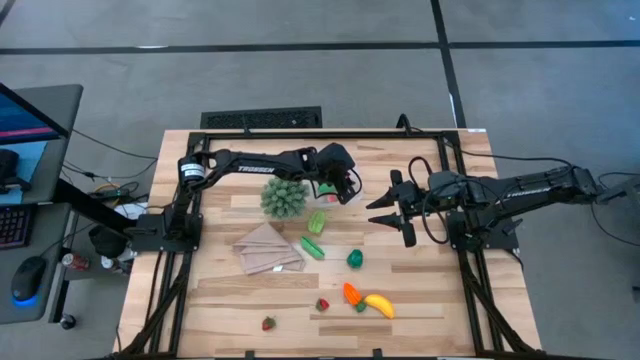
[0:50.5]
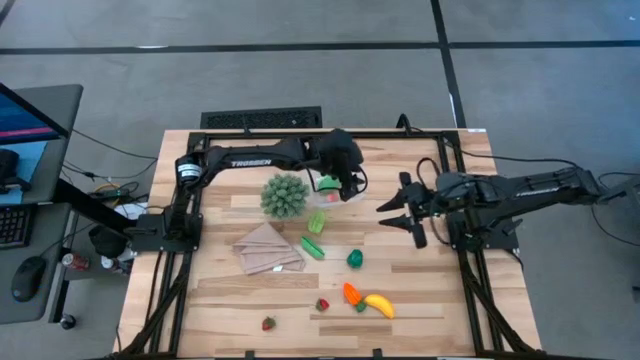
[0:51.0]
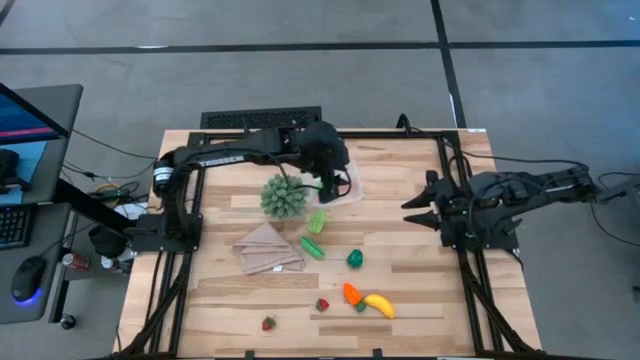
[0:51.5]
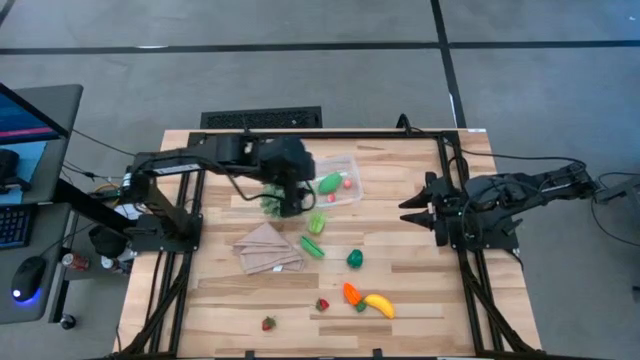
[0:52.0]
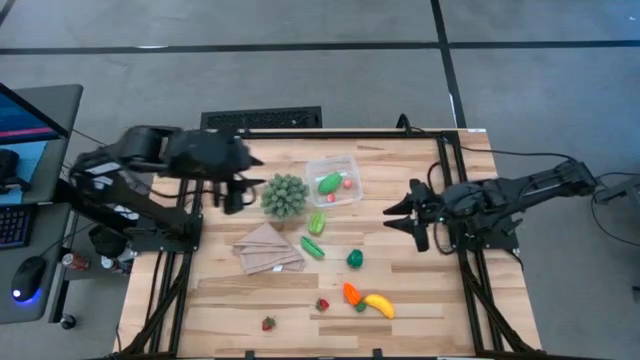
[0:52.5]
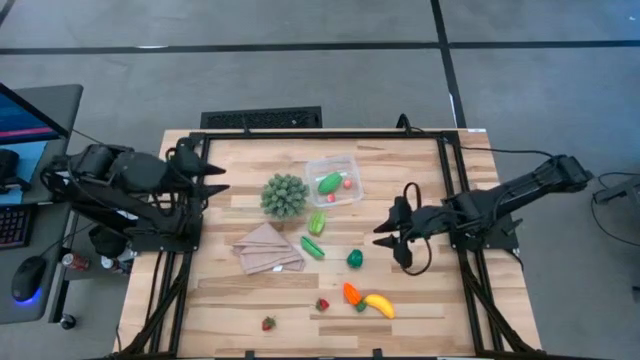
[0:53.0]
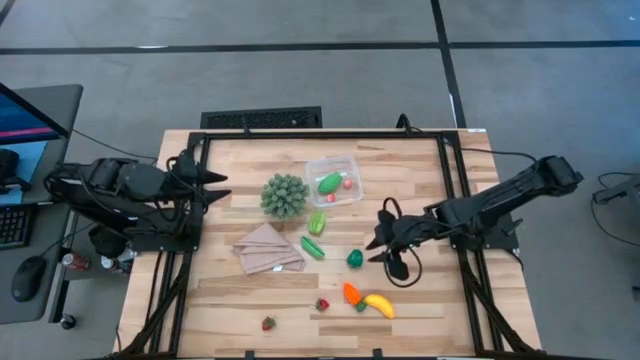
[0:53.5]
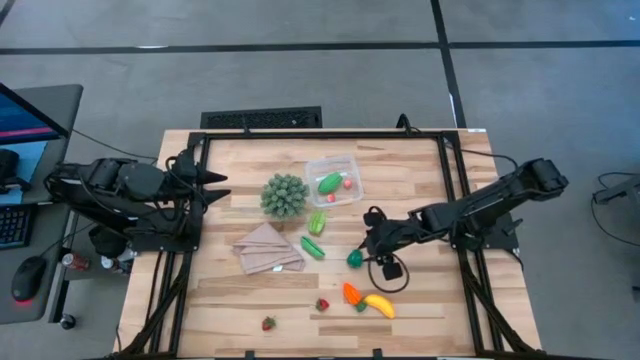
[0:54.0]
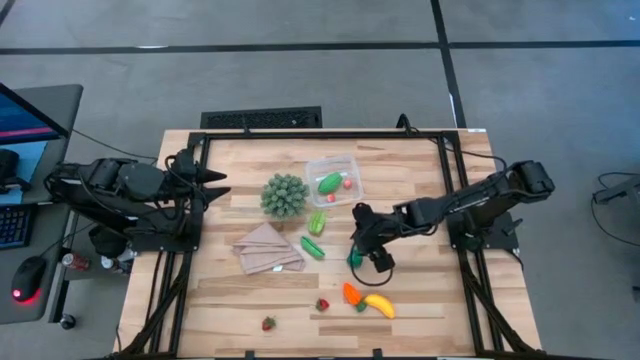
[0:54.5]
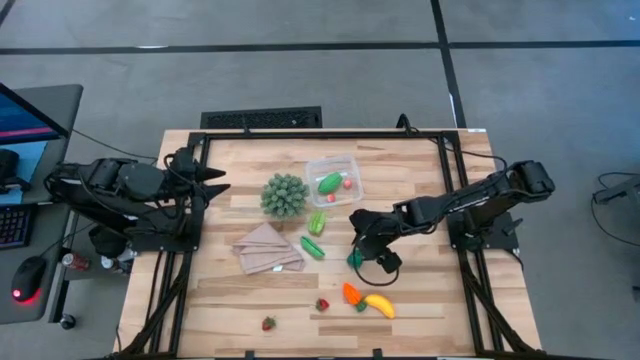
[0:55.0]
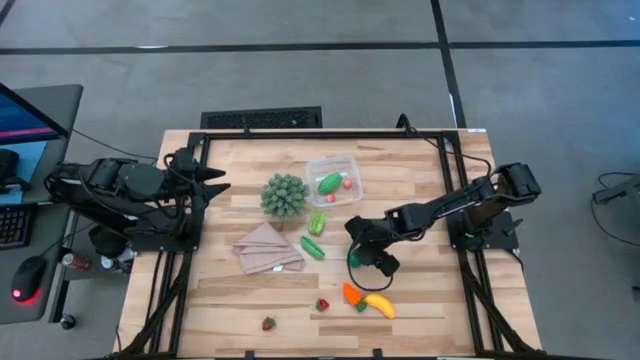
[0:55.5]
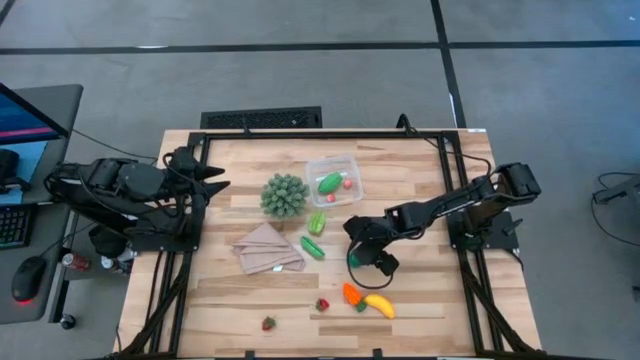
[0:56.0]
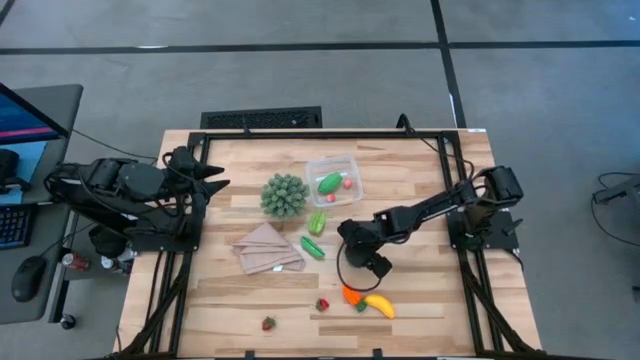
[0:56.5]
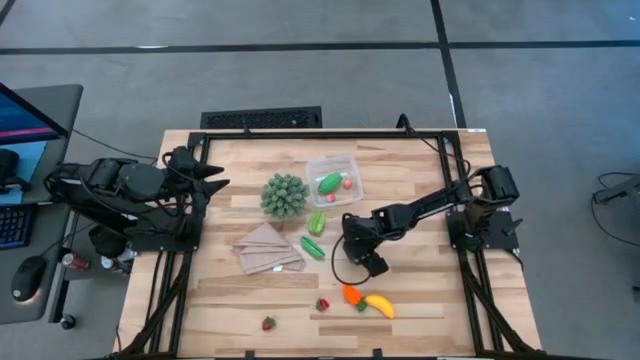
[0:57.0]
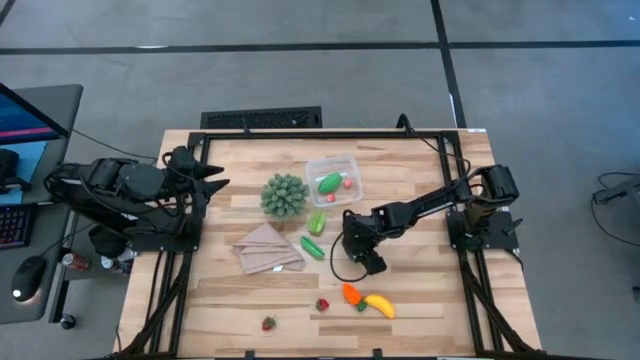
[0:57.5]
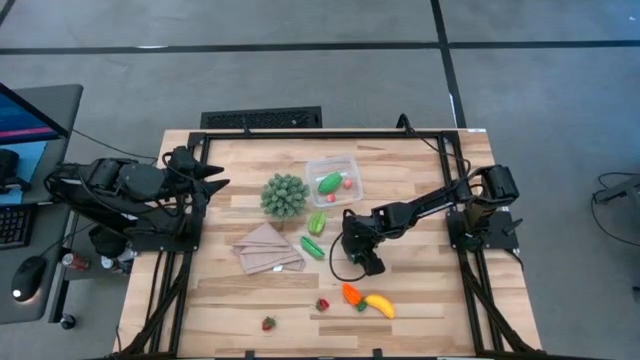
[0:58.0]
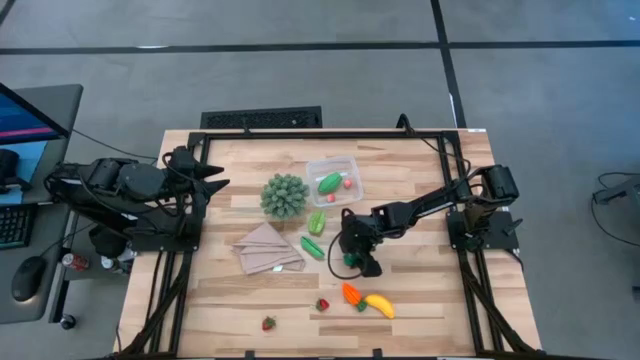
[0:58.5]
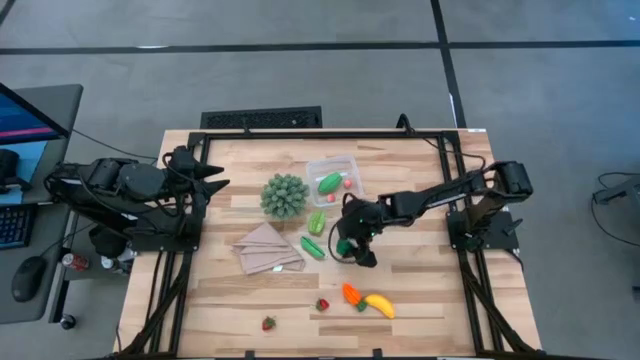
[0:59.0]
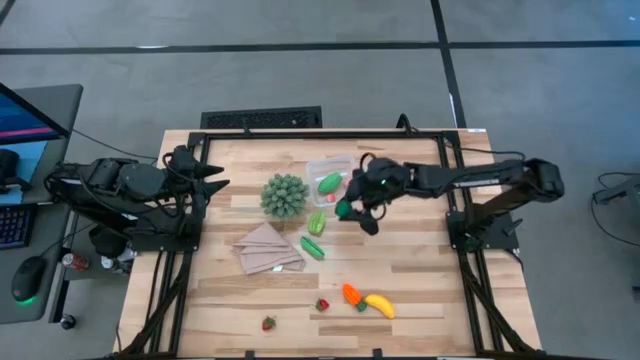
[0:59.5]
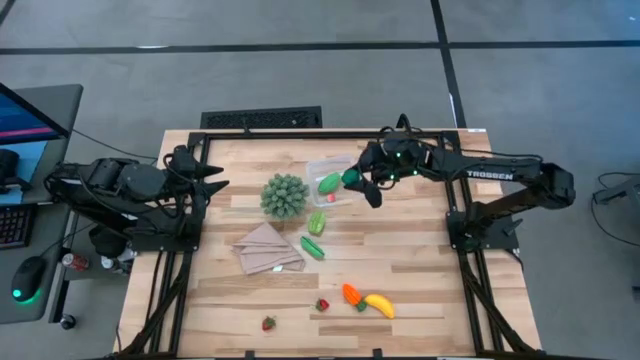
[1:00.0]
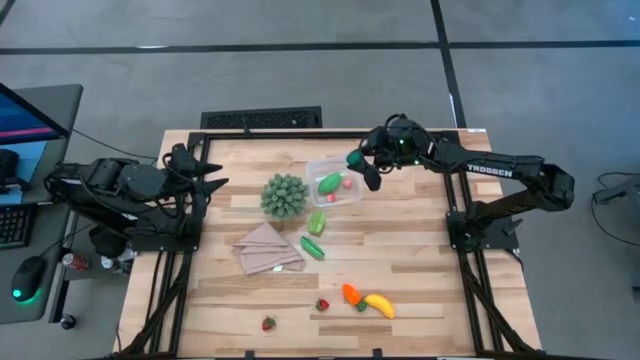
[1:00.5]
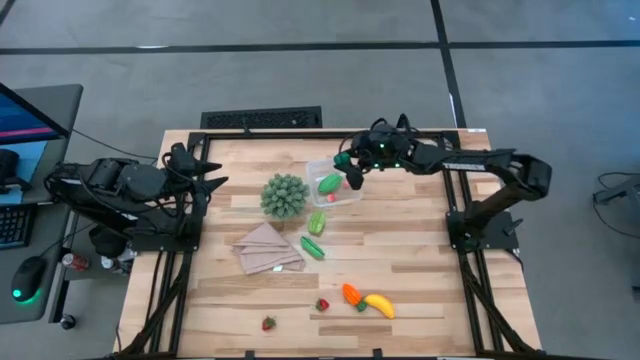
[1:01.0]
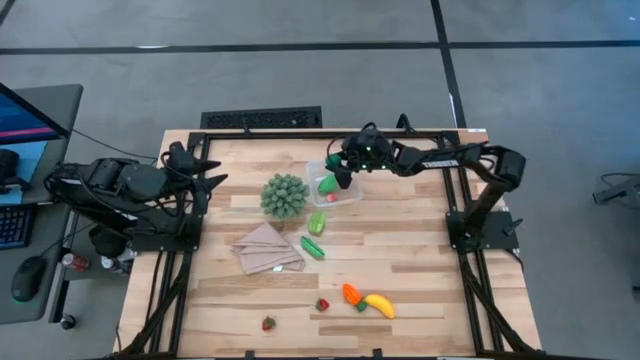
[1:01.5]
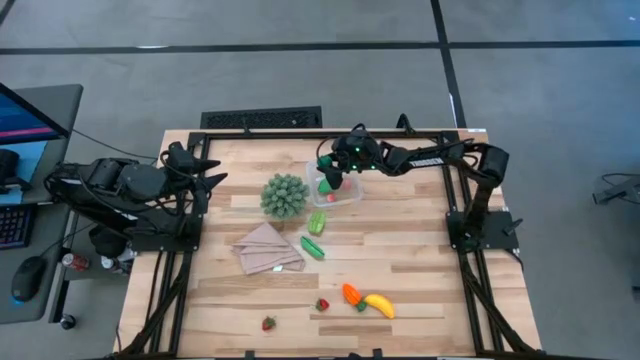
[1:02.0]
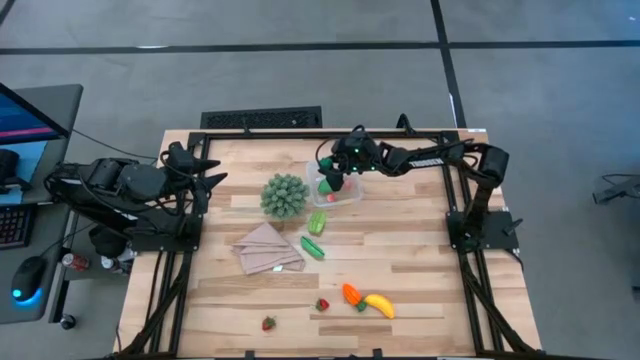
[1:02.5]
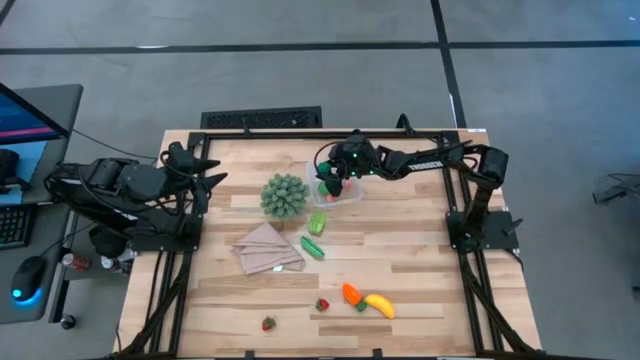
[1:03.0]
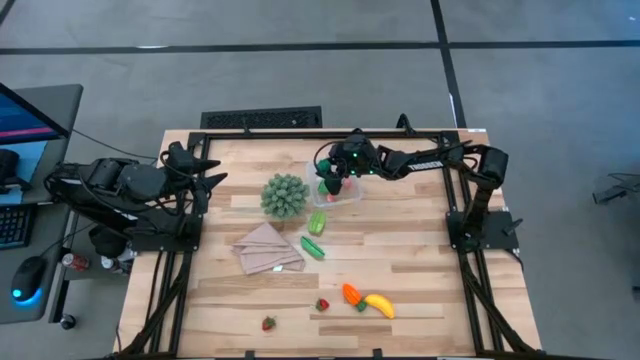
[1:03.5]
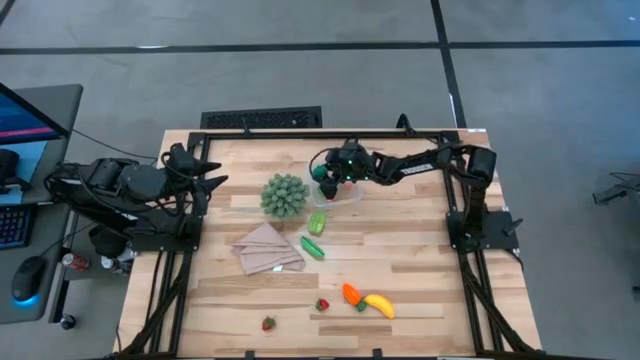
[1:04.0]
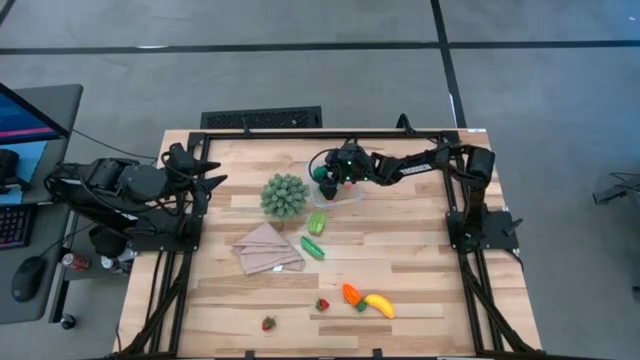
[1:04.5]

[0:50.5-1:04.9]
Task: Pick and placing Produce into tupperware
Put the green bell pepper into the transparent bin

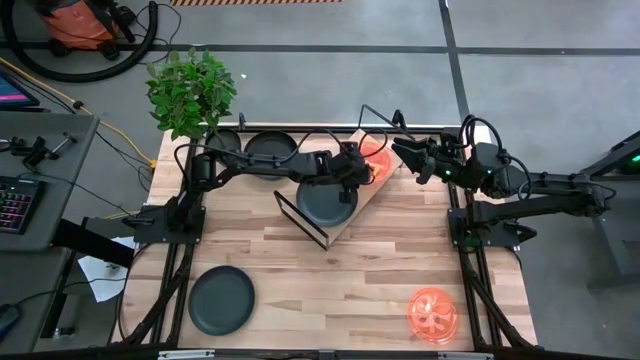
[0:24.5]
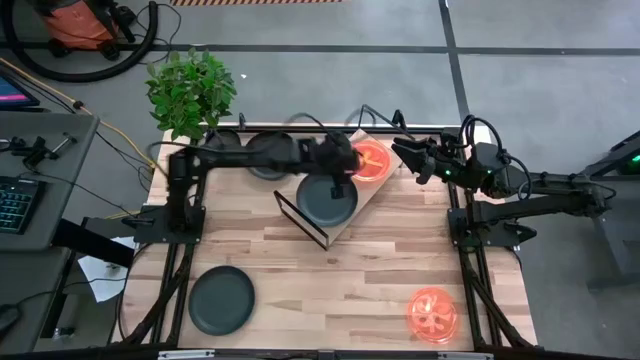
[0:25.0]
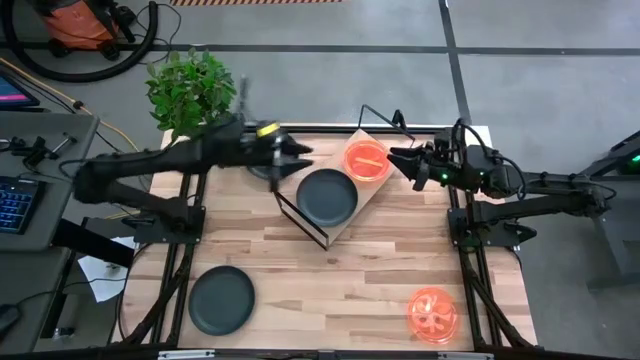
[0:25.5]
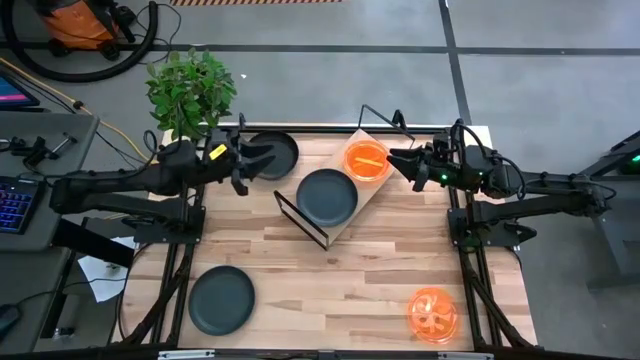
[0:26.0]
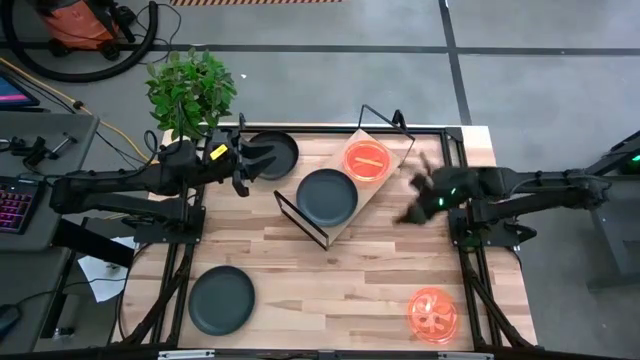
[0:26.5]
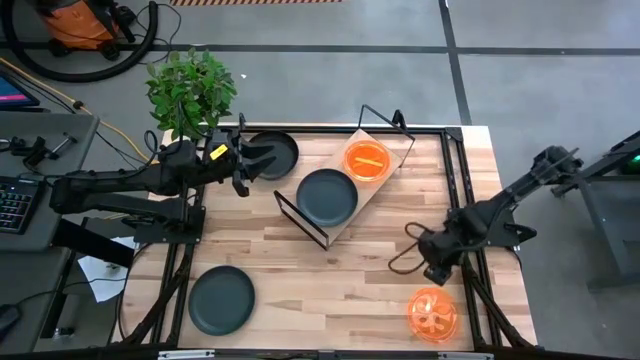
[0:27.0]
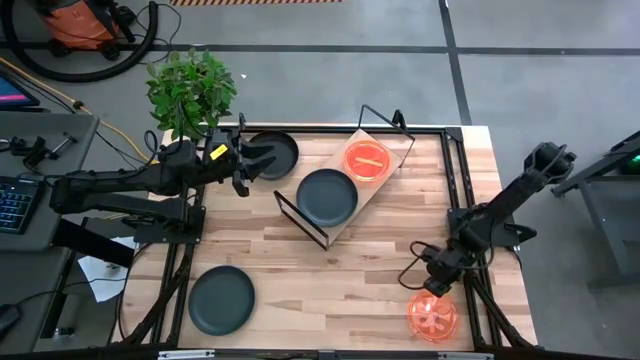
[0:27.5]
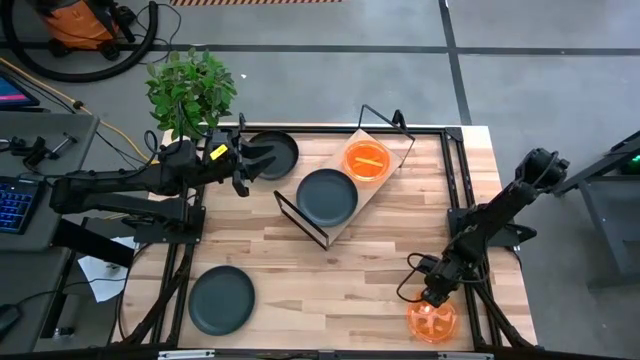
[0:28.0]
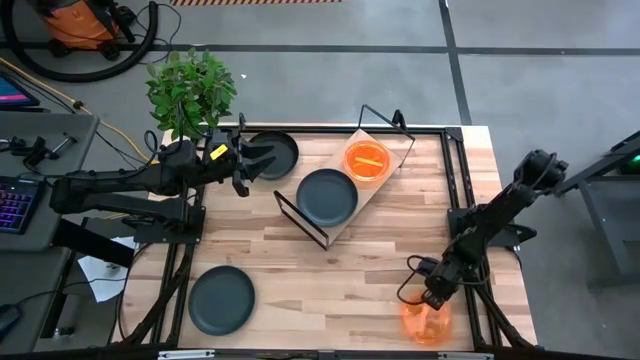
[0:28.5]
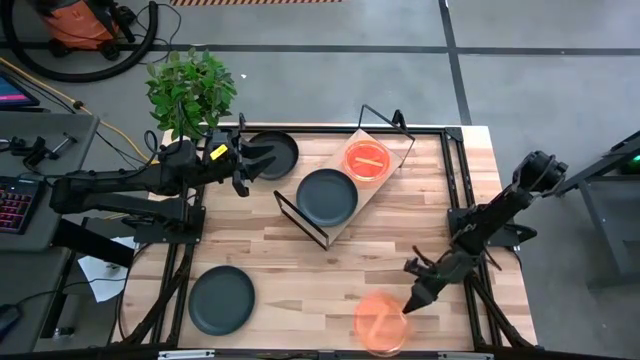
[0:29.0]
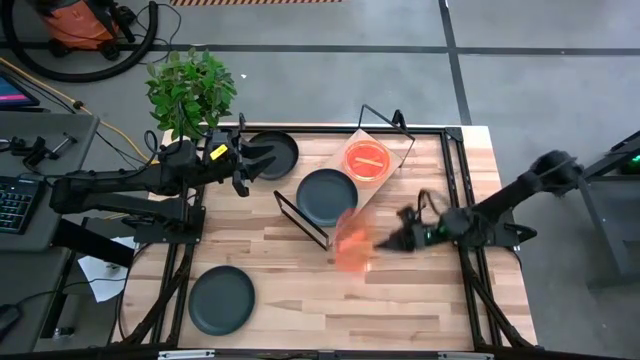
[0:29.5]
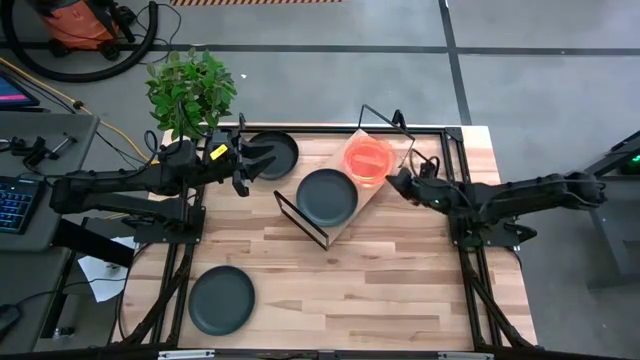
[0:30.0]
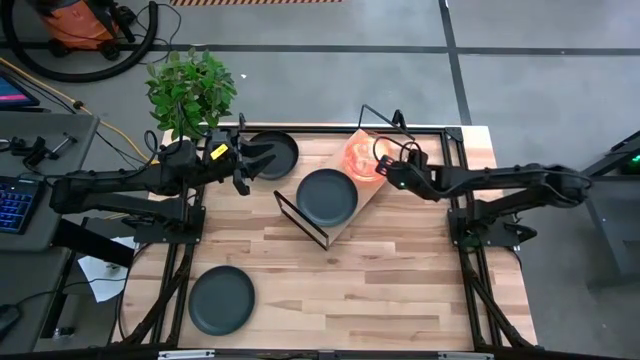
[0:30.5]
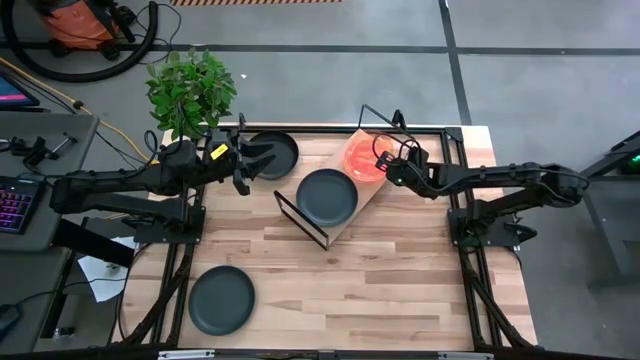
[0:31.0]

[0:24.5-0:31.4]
Task: Place and stack plates onto a shelf
Stack the orange plate on top of the stacked orange plates on the shelf
